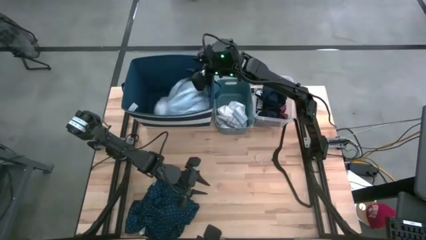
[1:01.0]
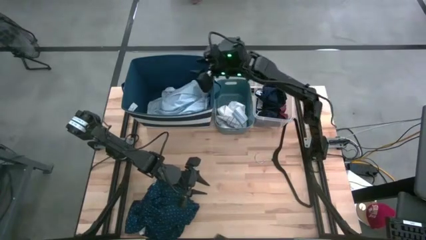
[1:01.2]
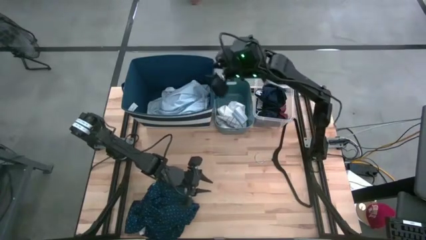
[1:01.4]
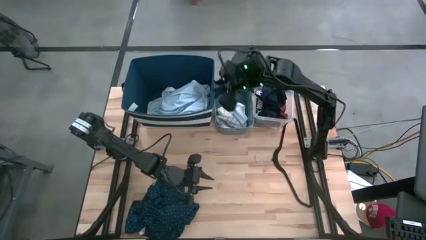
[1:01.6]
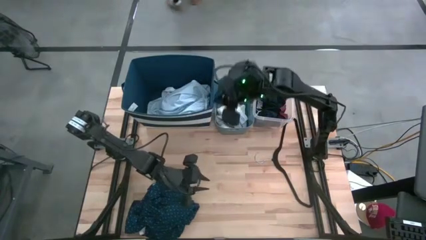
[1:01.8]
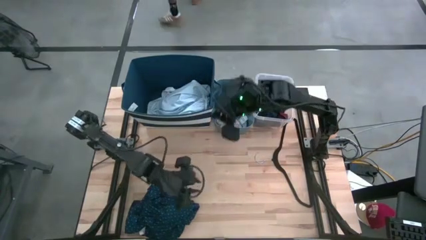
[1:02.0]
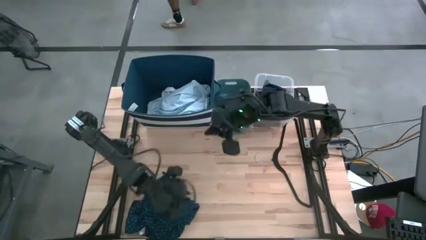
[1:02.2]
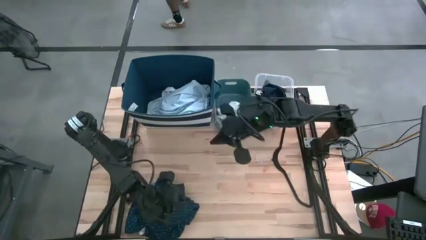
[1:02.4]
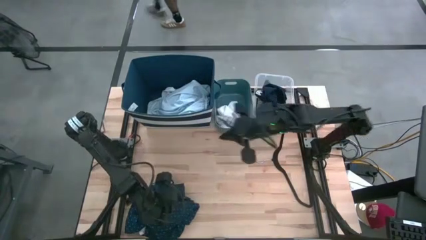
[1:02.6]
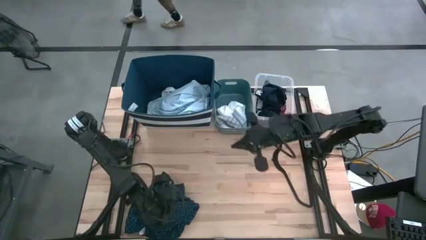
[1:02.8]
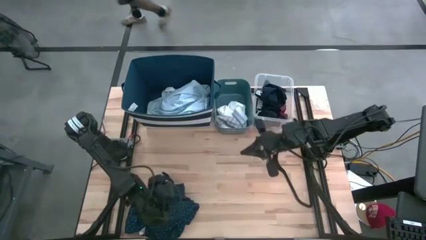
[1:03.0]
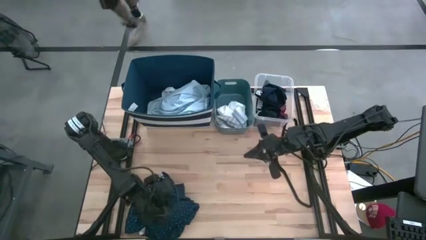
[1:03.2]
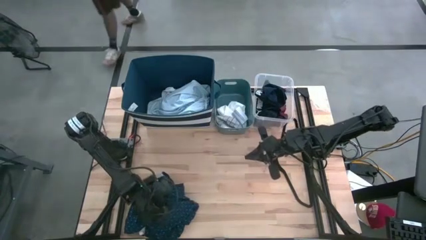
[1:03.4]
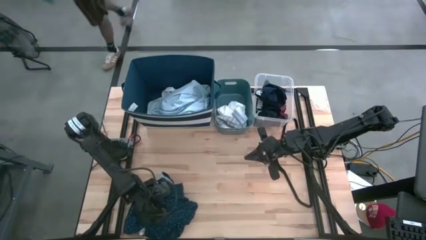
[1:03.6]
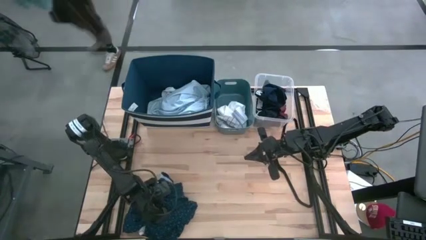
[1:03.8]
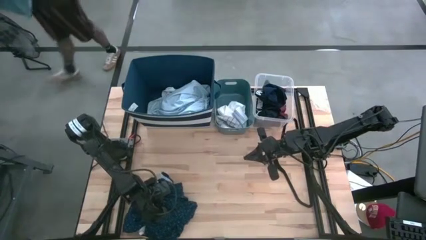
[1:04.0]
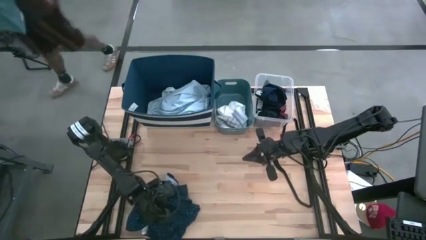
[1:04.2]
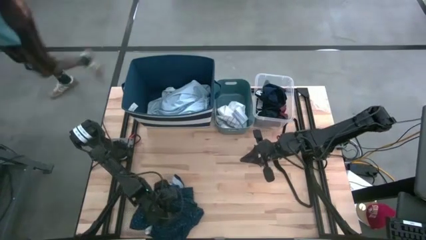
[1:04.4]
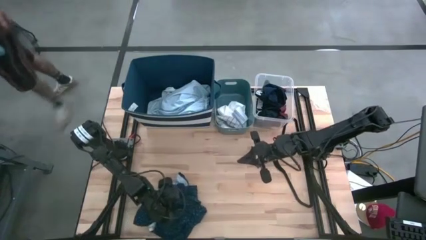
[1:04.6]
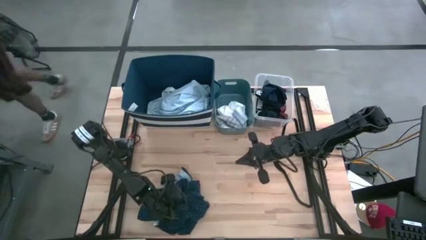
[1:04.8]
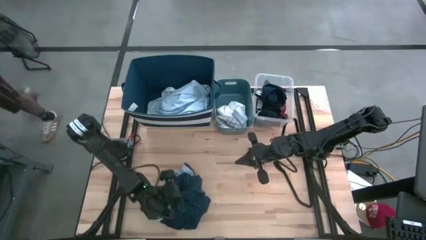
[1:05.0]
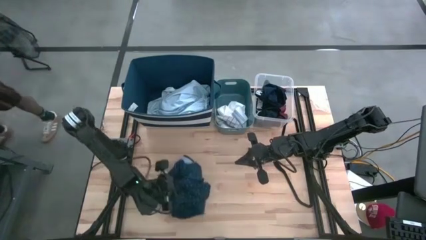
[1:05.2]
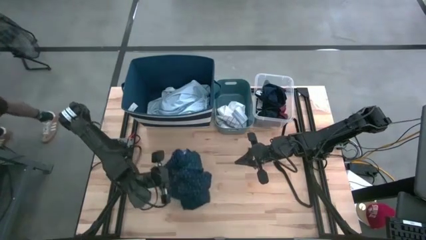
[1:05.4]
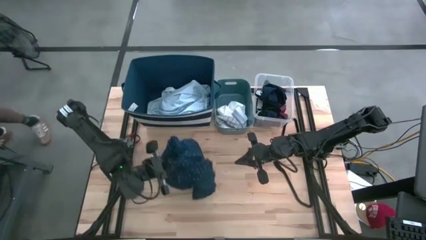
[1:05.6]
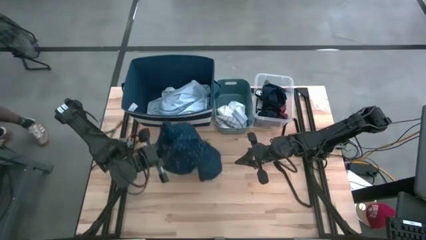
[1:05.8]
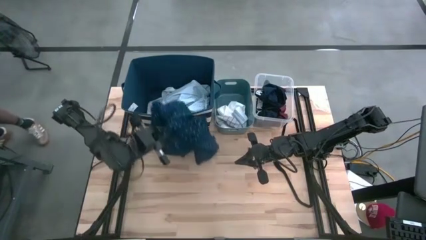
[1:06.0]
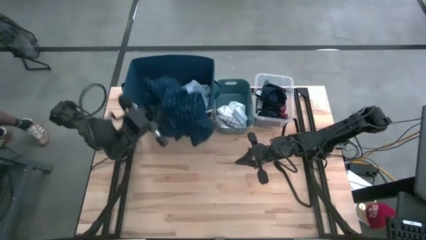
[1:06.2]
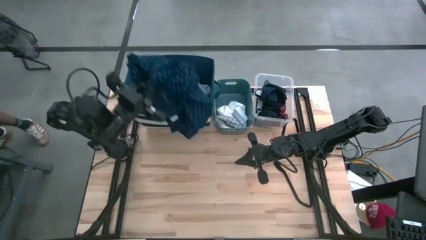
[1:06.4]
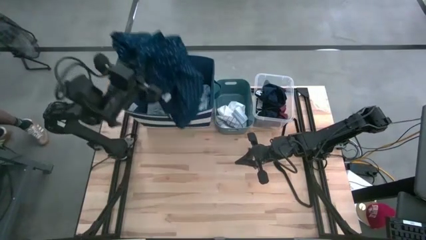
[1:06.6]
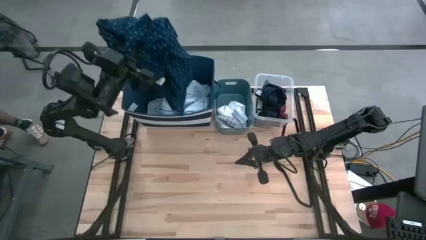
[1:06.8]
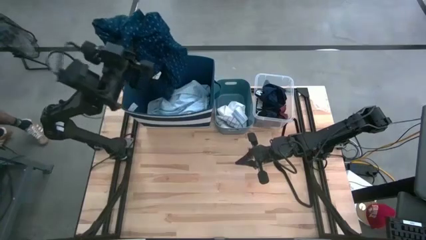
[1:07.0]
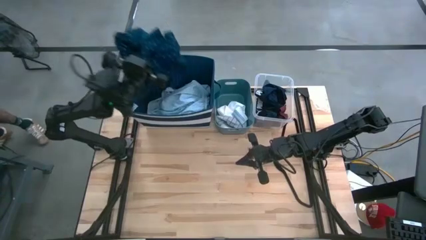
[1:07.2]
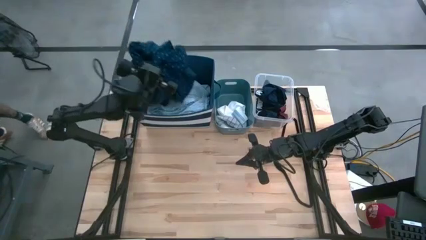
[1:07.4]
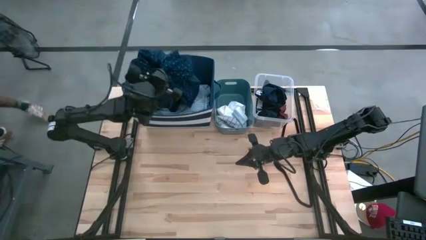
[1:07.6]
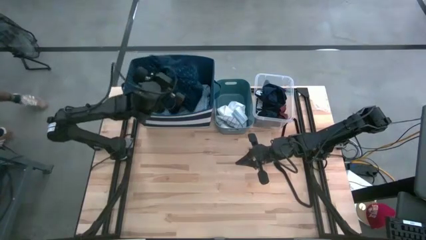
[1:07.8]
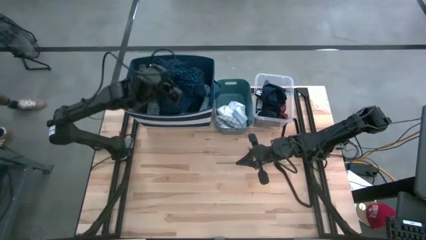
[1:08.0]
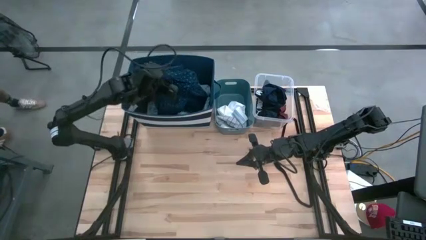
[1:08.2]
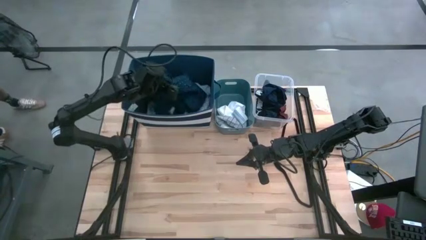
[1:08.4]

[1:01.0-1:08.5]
Task: Pick & Place Cloths
Put the black shirt into the blue laundry organizer

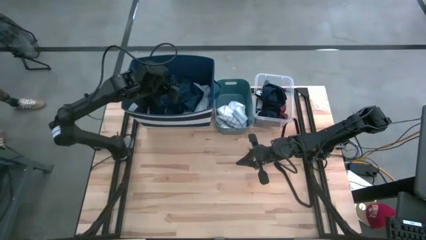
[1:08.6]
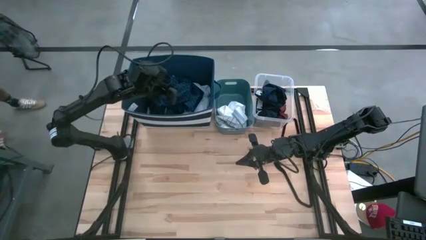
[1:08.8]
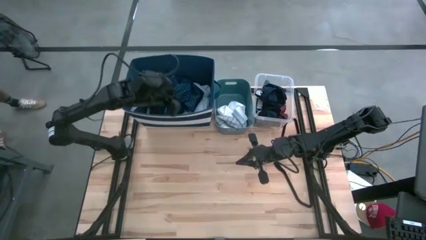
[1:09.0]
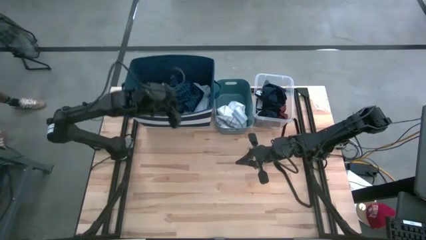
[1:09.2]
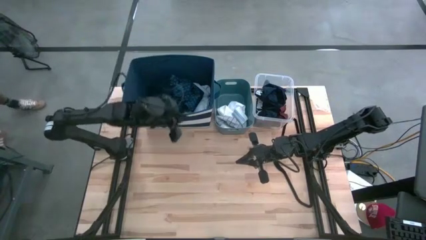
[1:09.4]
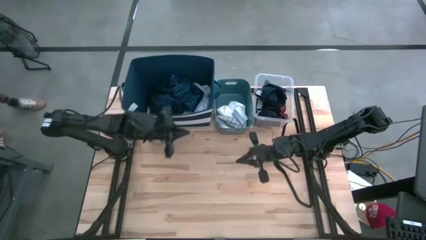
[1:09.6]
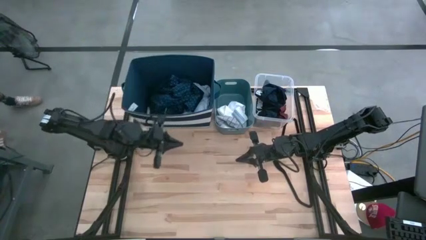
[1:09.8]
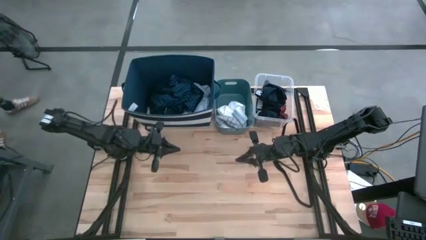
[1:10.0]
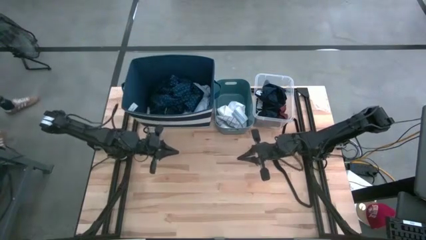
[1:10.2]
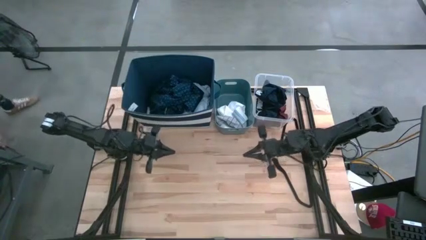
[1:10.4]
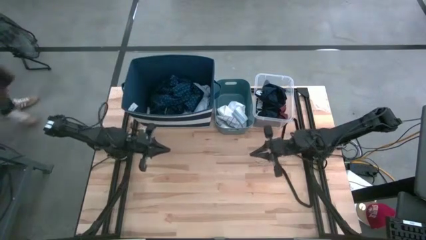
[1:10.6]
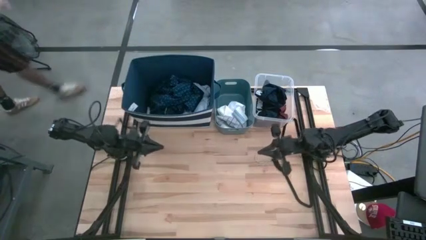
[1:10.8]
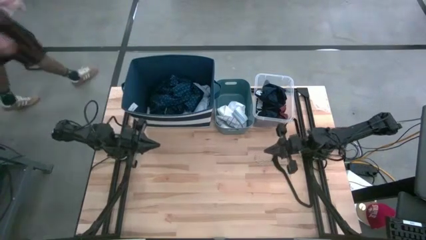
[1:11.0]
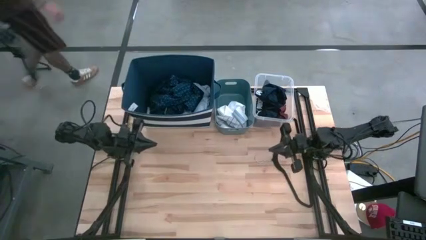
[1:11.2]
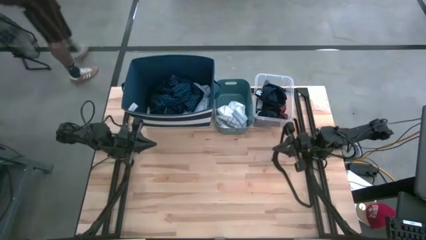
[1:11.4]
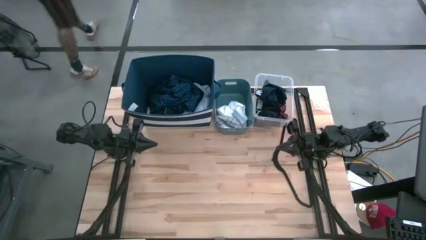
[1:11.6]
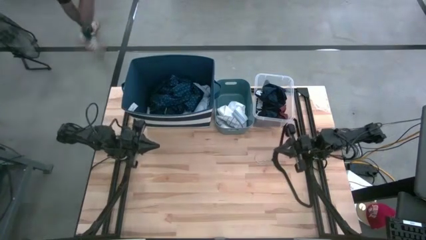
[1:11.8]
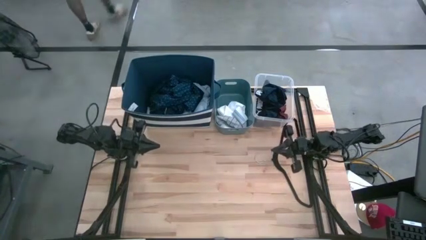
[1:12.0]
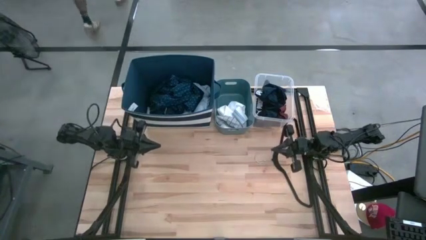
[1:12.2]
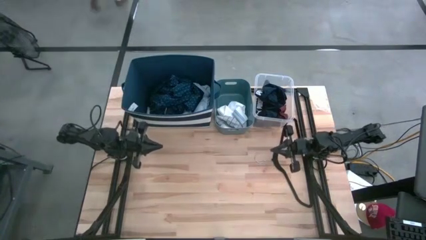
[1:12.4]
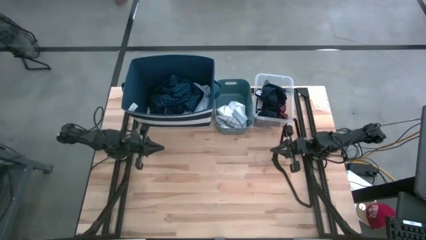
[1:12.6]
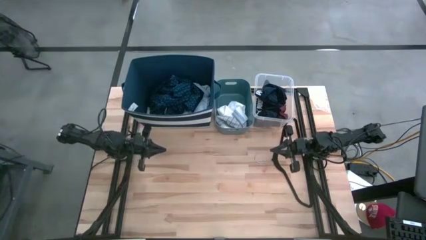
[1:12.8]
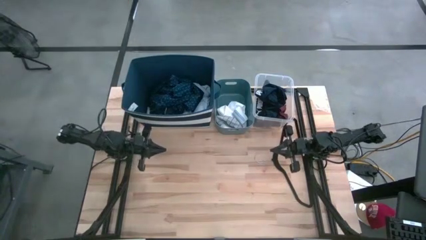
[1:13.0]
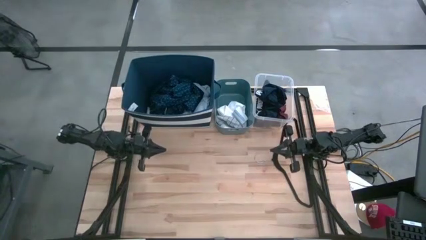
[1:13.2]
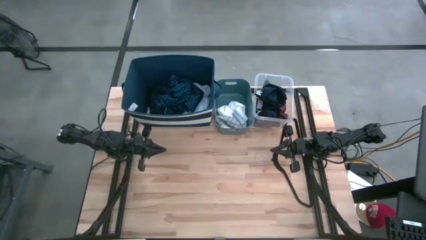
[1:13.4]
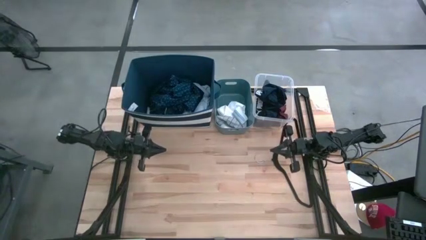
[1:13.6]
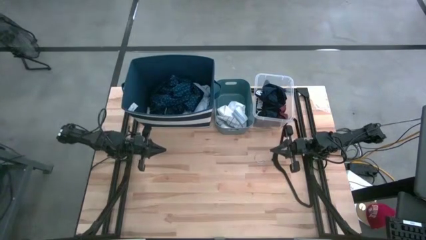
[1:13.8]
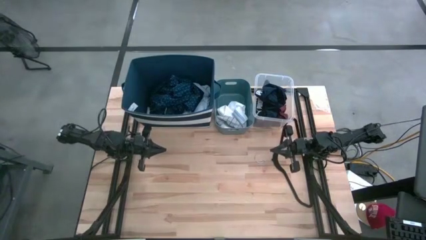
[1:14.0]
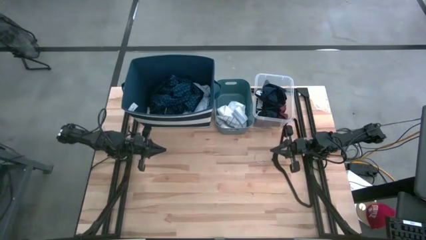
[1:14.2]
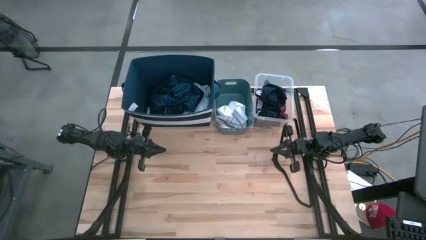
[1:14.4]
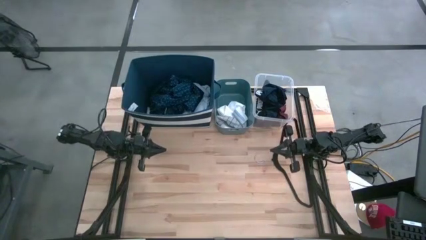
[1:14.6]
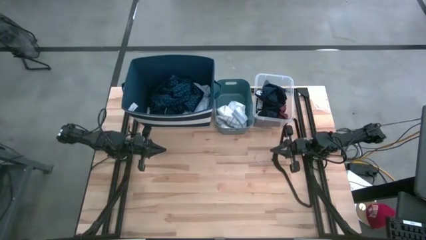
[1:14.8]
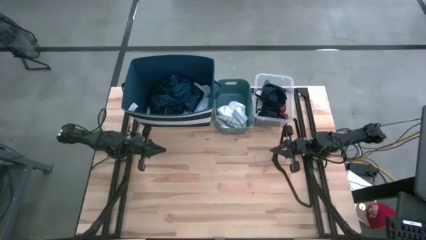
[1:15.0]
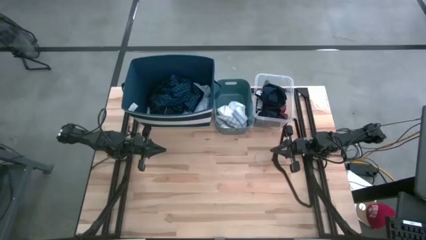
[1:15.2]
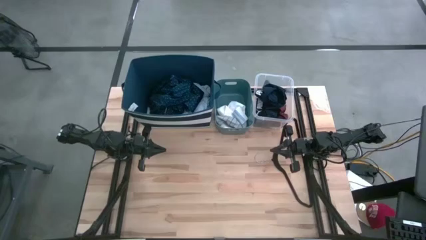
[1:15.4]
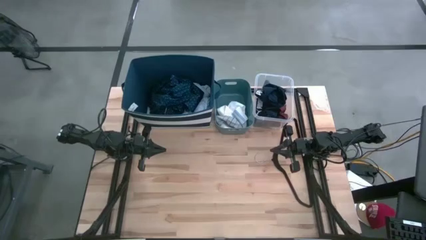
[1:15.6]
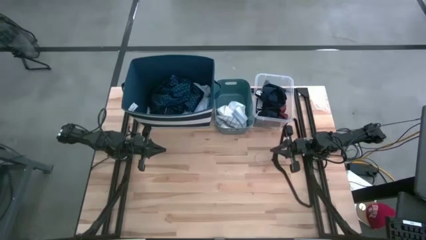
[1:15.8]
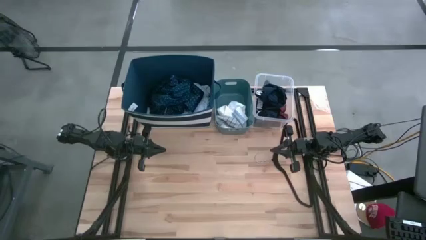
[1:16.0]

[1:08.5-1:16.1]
Return to Home Position

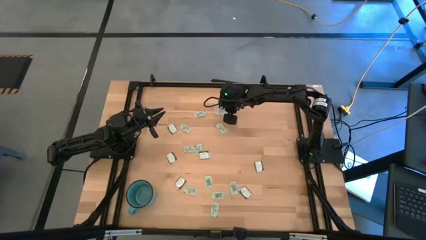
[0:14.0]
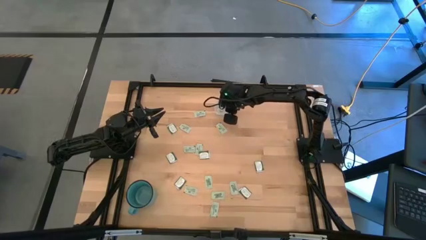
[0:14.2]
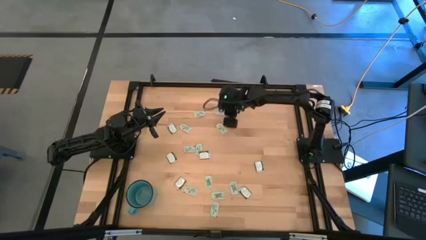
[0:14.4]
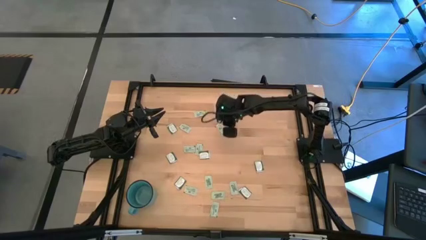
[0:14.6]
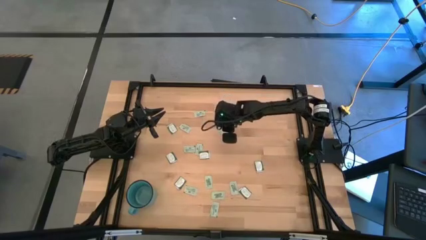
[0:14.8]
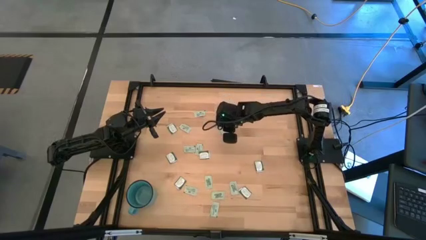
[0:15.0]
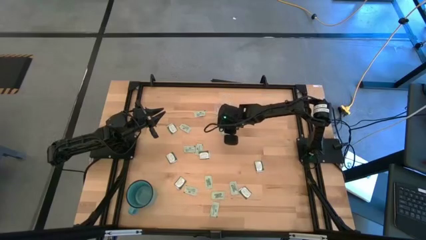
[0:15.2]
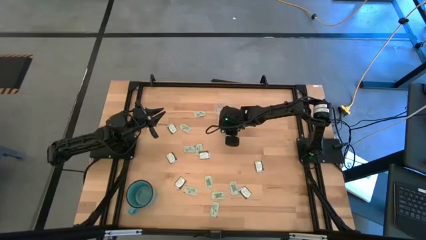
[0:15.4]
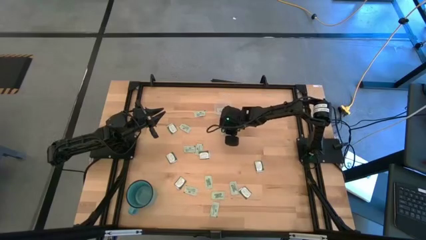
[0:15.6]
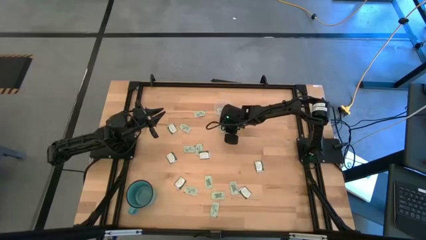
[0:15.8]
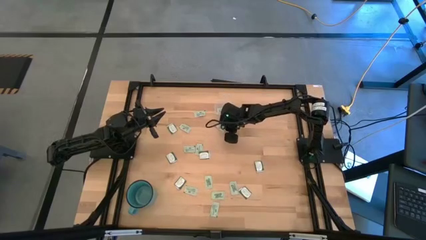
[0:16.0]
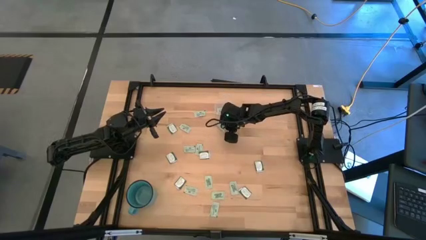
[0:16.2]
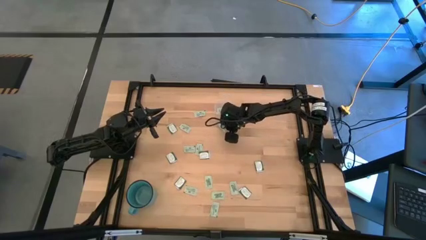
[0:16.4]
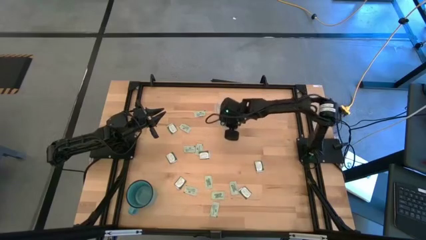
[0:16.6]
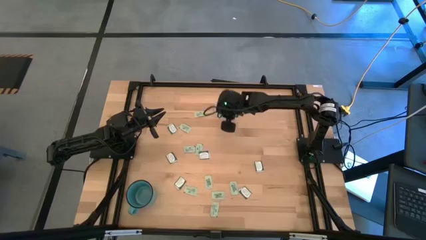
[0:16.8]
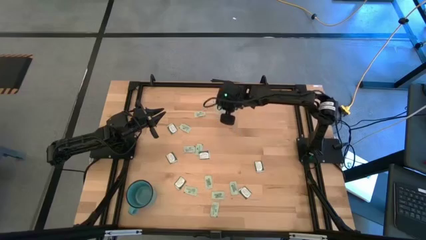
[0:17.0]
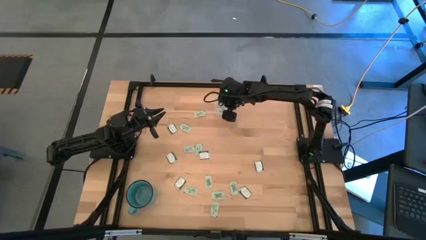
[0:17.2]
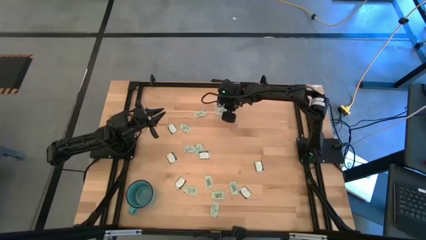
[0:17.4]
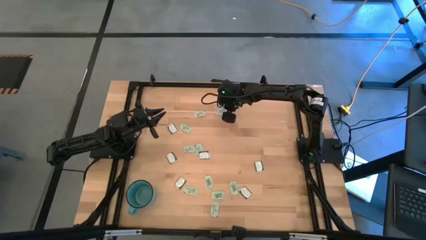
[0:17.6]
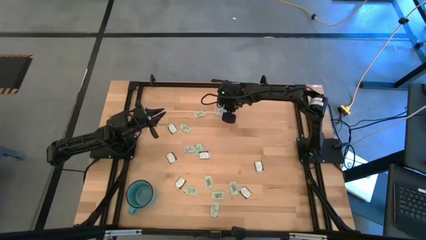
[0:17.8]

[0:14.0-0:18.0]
Task: Pick and place items into bin
Put the light green stevia packet into the transparent bin
